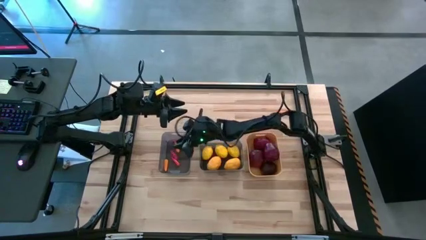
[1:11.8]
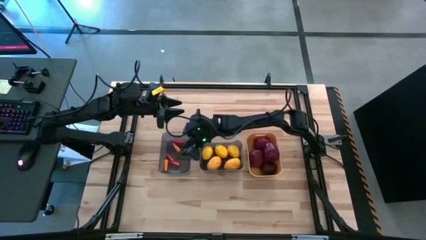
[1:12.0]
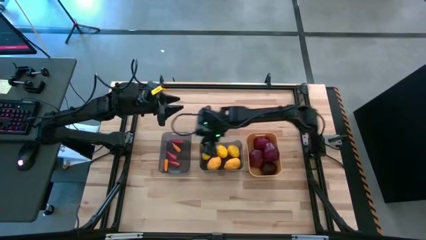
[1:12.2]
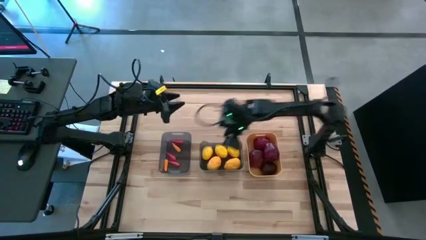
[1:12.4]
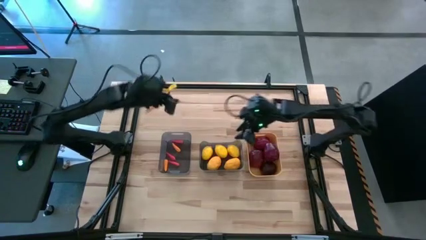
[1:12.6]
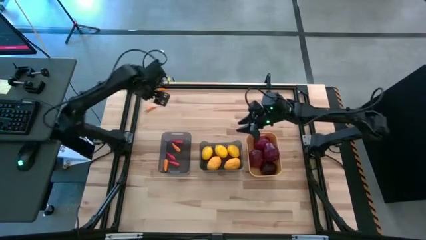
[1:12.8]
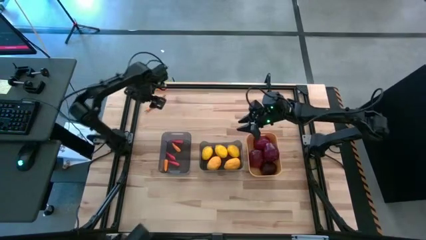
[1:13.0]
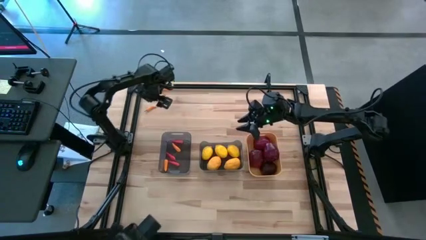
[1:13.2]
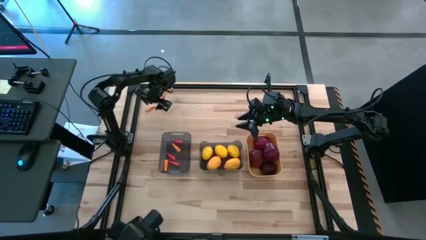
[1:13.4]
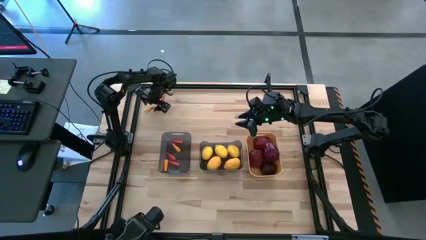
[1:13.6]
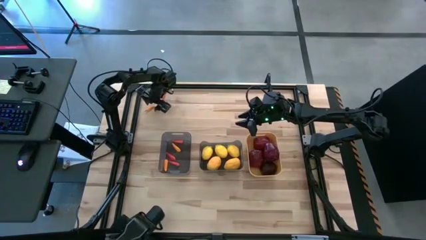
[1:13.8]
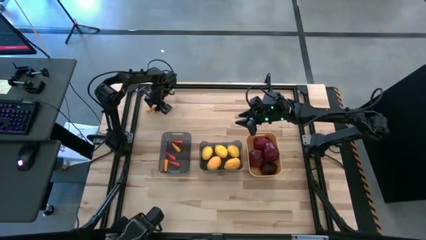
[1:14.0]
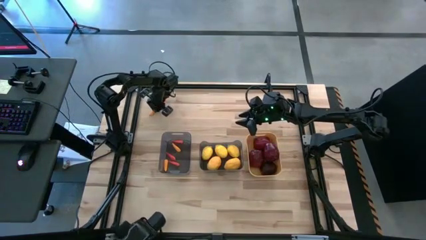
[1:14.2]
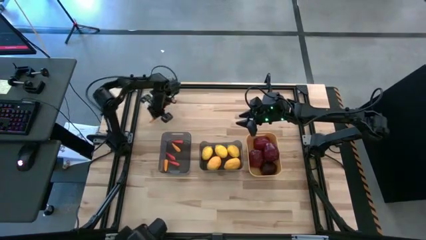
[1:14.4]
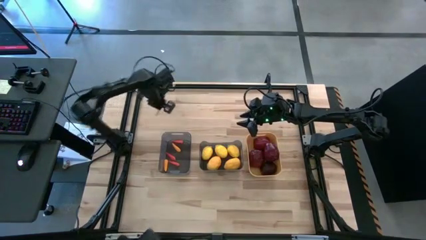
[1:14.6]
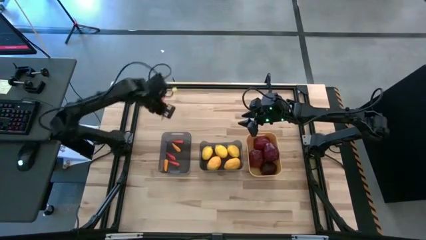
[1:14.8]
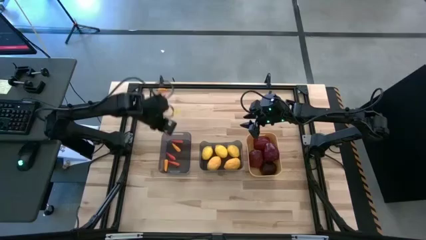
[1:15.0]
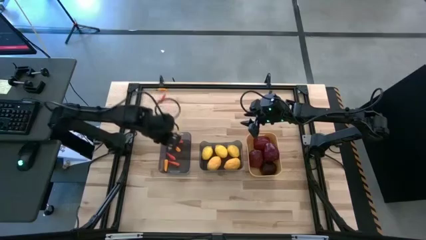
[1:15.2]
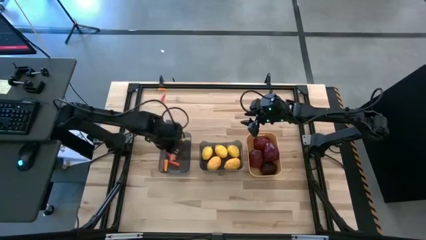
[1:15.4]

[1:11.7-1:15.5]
Task: Sort produce into baskets
Put the yellow chili pepper into the left black bin

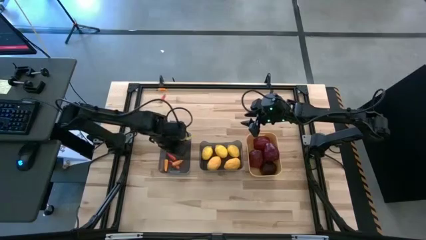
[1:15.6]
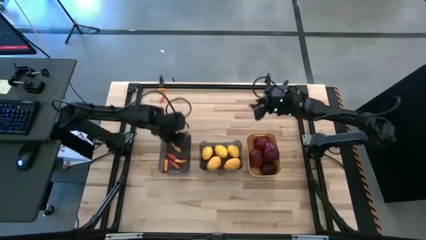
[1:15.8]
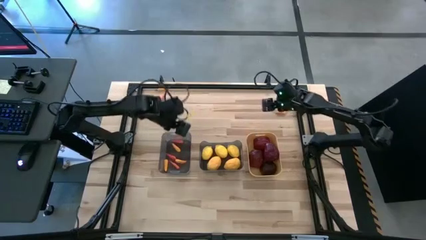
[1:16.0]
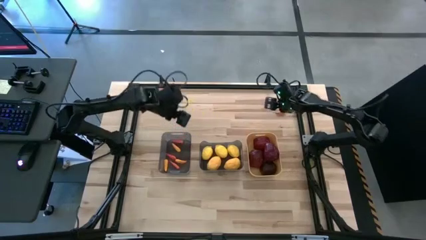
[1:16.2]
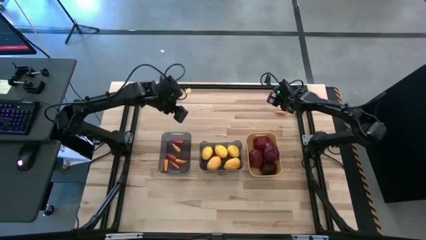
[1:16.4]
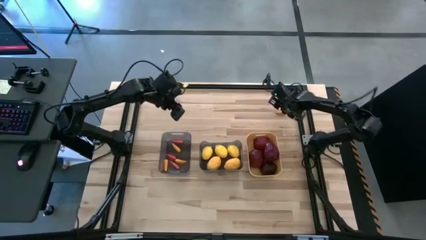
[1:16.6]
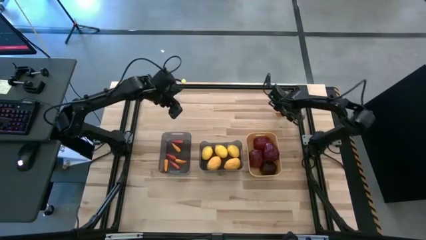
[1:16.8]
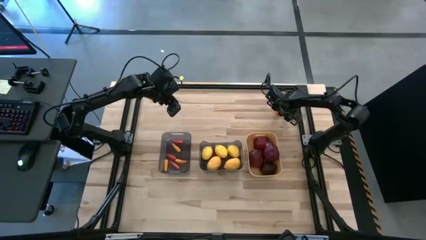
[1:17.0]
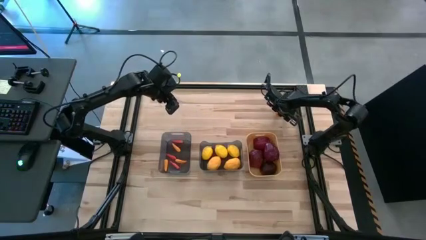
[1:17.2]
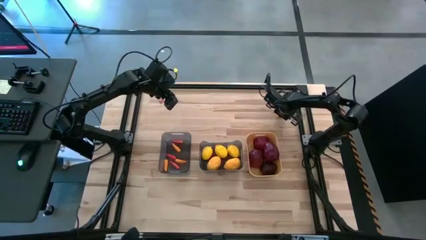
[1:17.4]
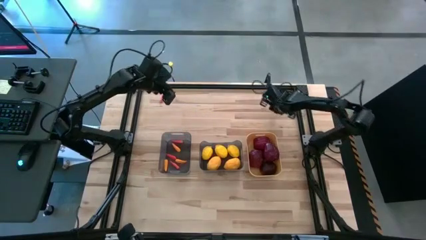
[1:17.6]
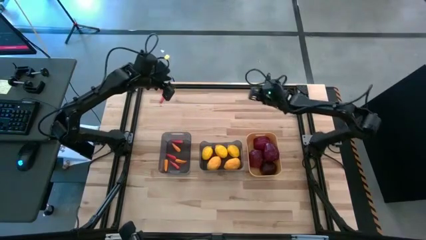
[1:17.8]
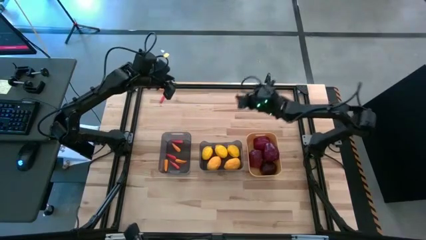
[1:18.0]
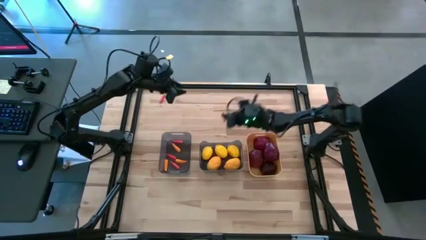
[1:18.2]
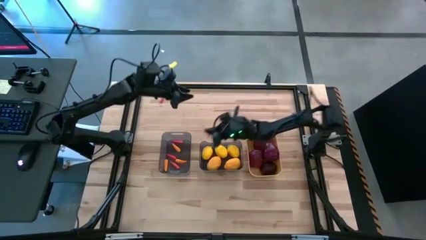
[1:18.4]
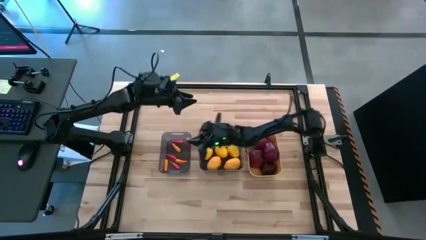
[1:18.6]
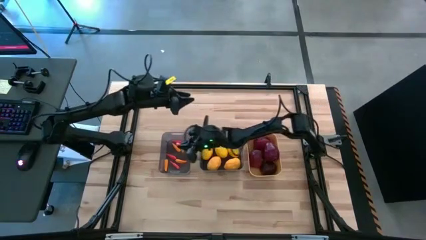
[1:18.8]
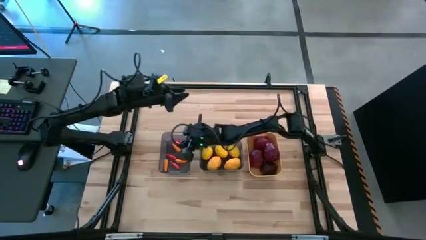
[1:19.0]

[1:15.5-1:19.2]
Put the yellow chili pepper into the left black bin

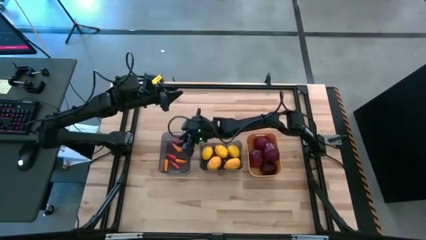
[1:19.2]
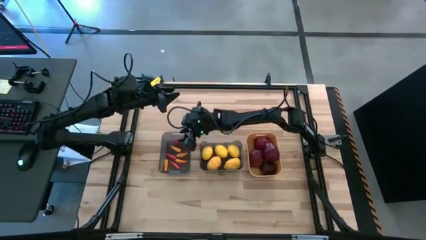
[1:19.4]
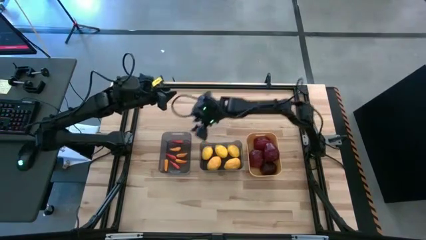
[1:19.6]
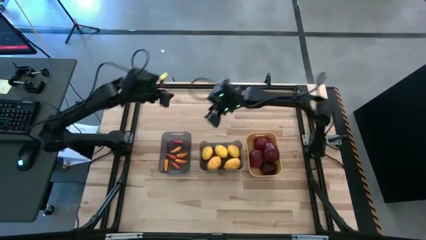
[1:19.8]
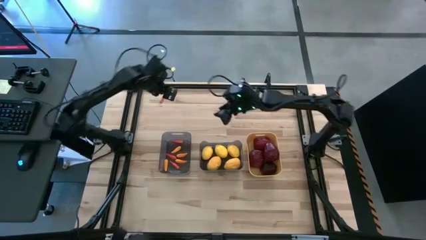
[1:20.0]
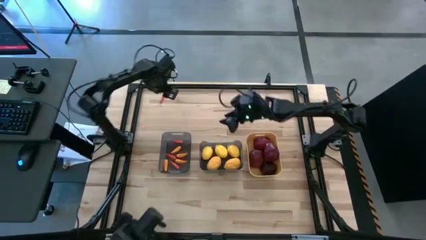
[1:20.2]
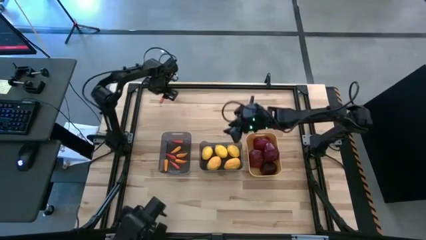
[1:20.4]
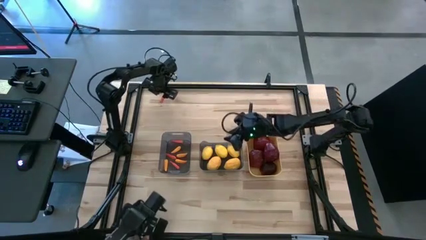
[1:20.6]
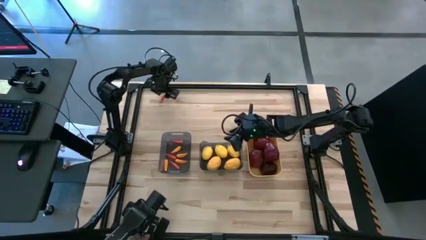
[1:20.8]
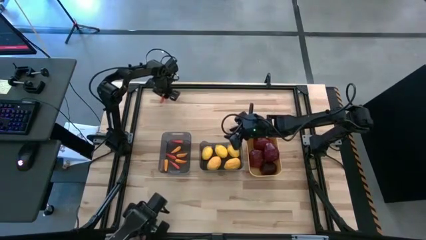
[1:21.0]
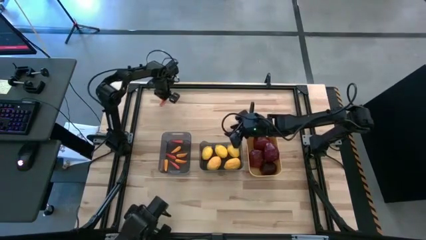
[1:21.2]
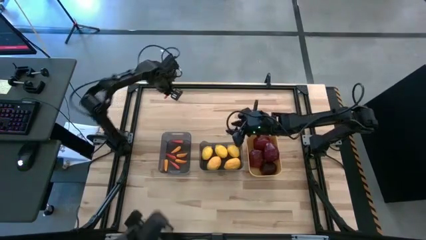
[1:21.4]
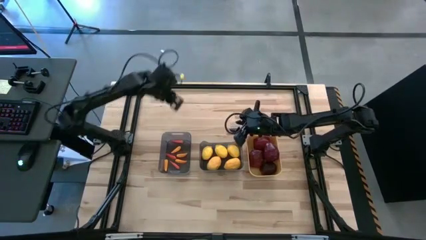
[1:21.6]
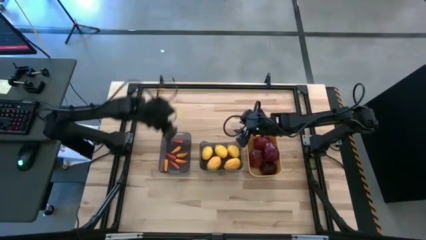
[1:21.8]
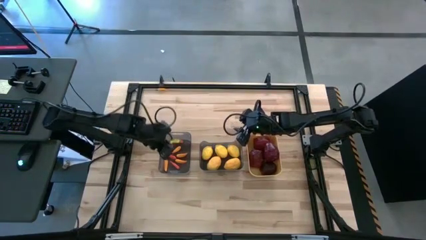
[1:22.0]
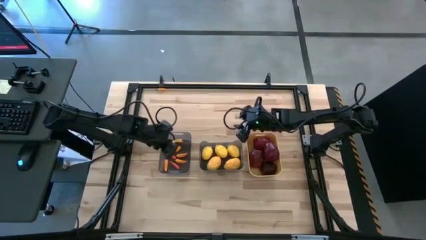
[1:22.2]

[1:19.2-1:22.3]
Put the orange chili pepper into the left black bin

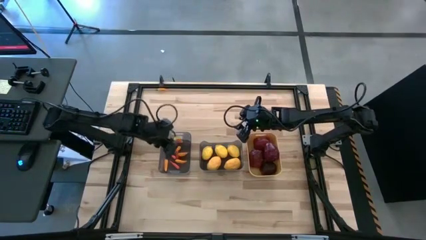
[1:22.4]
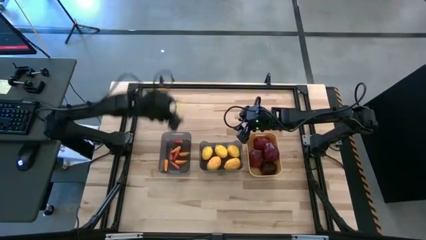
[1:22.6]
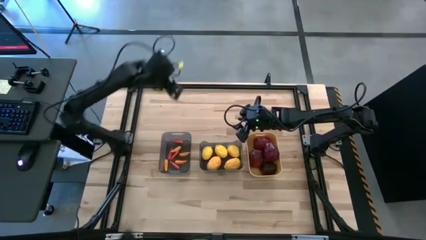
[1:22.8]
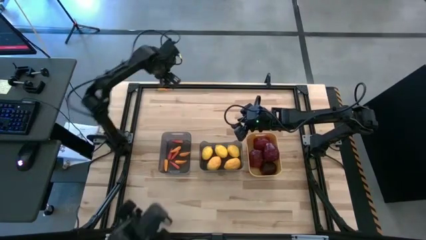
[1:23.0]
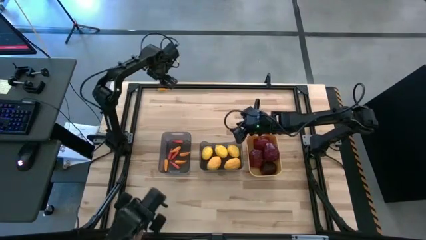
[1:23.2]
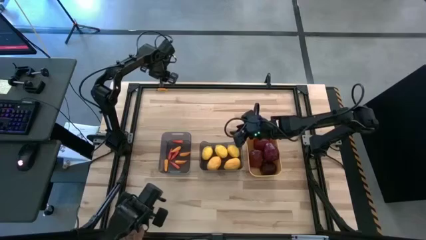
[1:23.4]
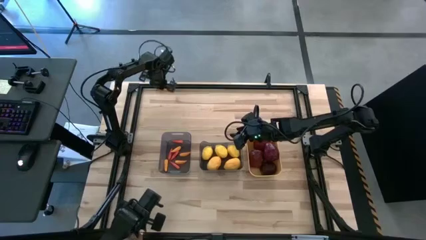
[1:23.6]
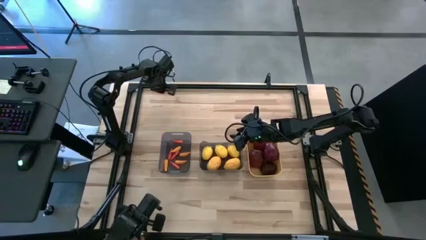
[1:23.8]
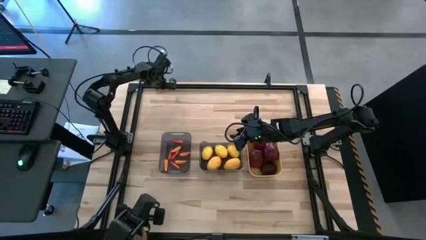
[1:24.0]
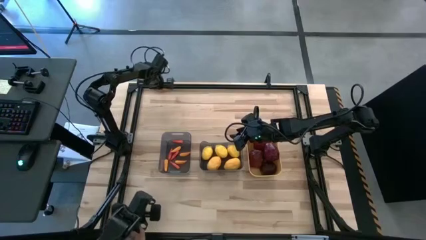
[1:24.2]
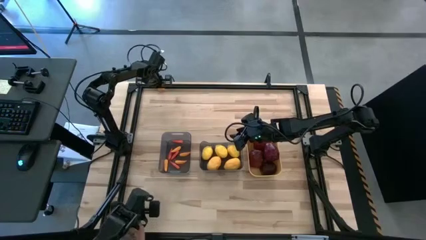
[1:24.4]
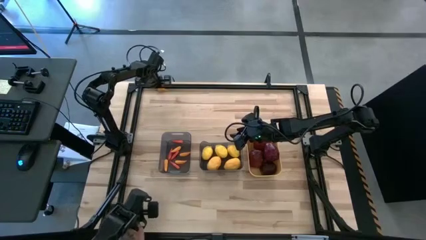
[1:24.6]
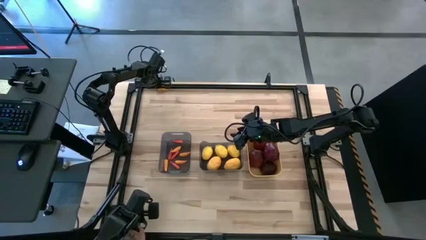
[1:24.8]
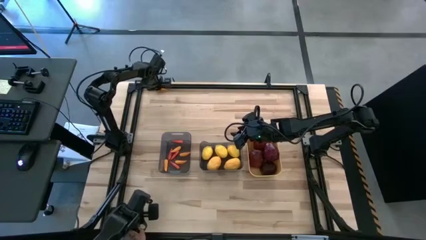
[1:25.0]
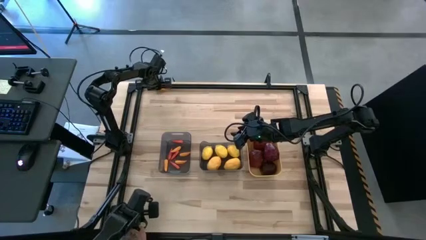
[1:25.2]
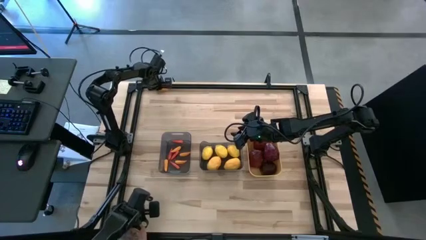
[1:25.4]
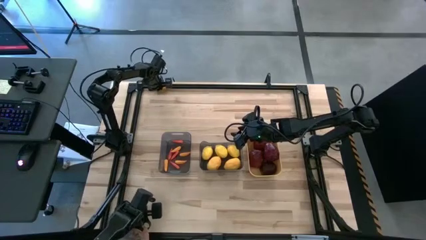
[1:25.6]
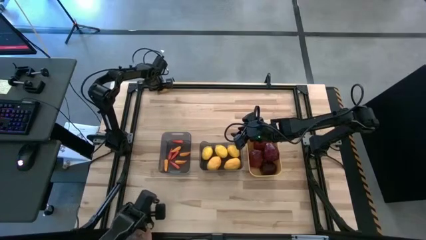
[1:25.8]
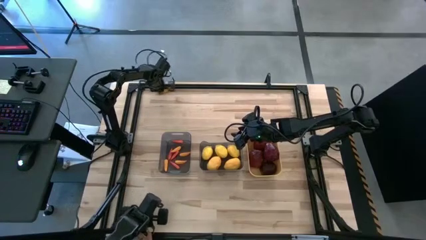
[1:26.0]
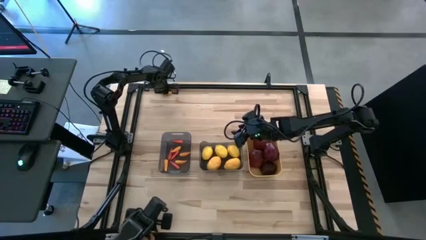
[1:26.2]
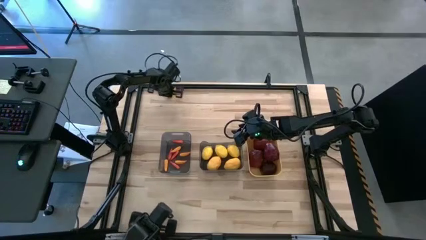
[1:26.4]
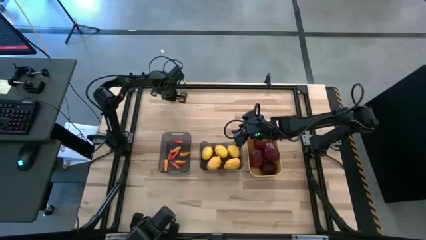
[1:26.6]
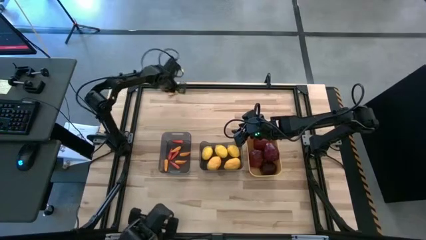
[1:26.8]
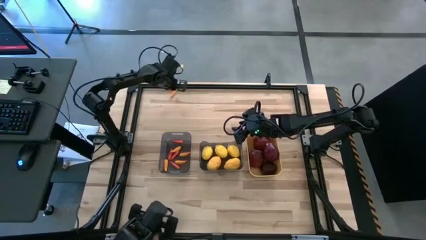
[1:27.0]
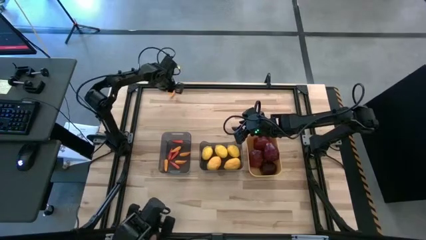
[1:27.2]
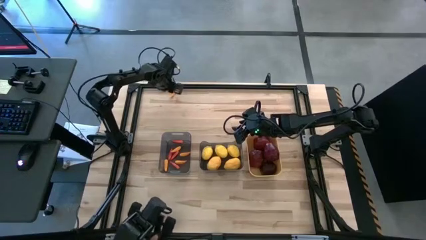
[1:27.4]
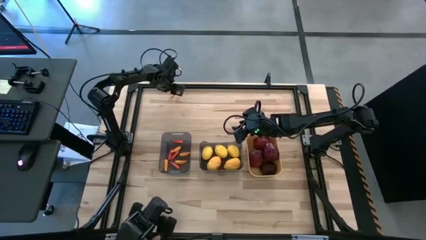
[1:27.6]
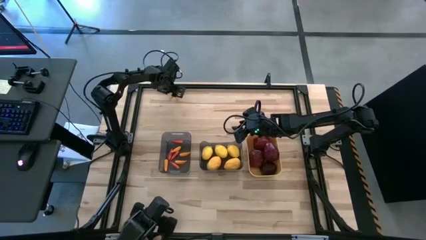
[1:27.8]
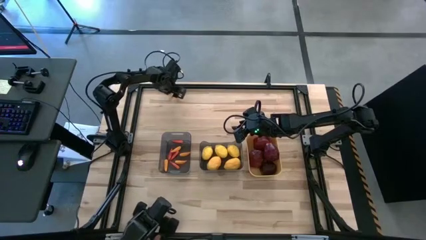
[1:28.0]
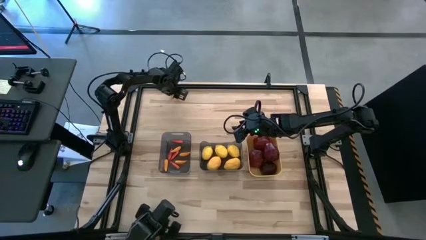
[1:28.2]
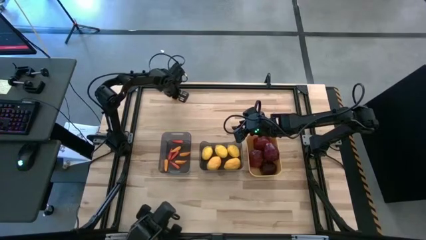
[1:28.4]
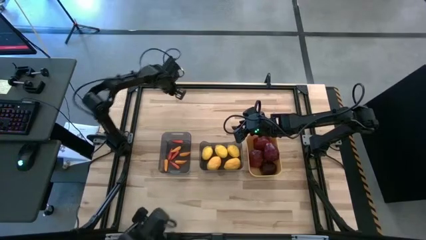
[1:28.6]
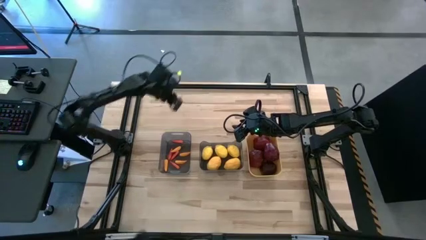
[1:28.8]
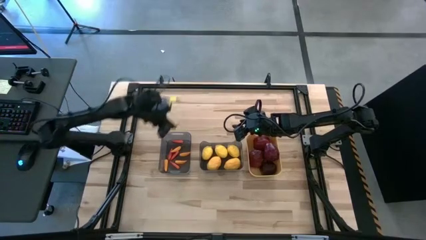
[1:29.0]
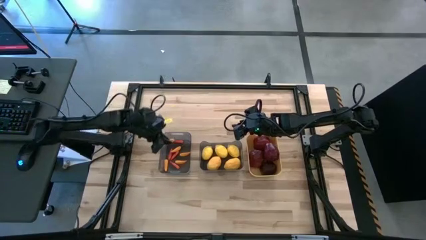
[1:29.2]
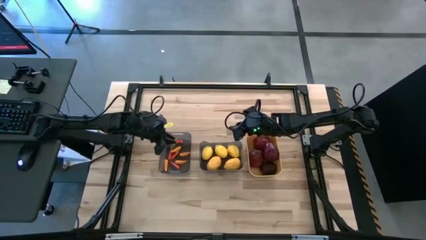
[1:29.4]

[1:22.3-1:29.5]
Put the yellow chili pepper into the left black bin
